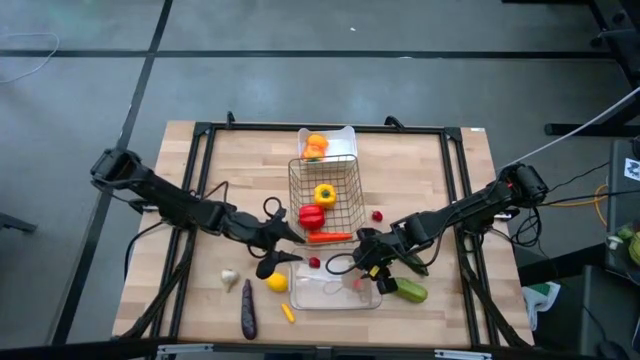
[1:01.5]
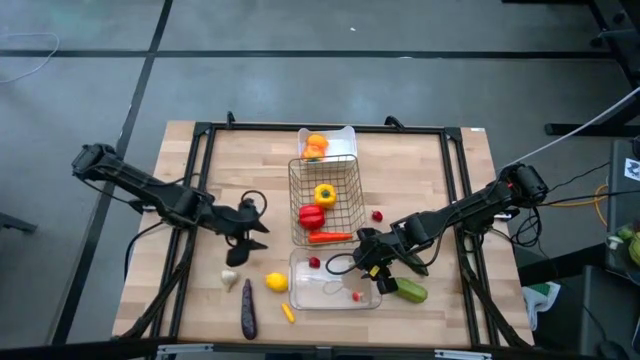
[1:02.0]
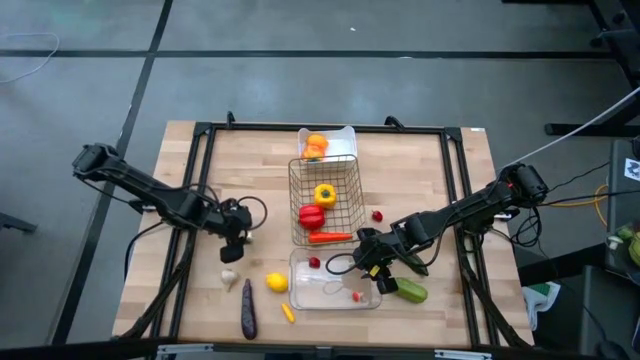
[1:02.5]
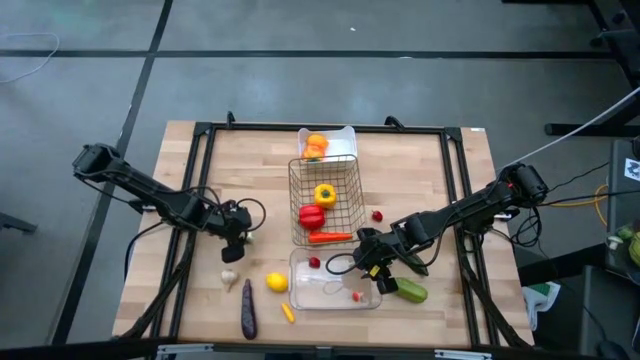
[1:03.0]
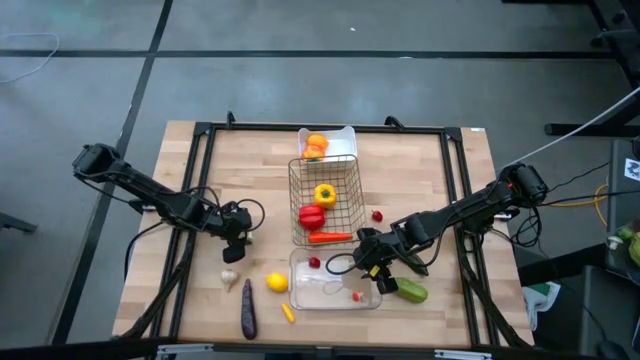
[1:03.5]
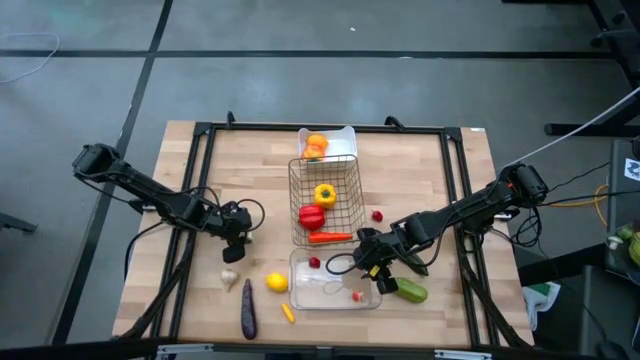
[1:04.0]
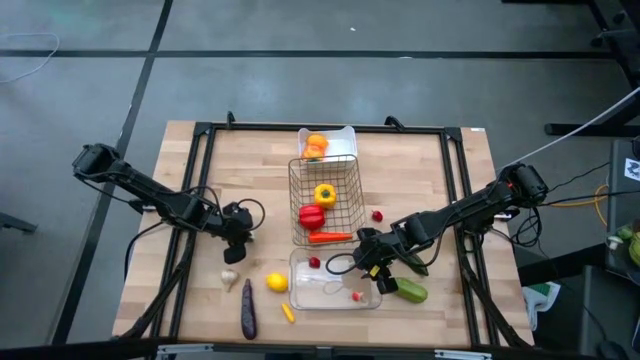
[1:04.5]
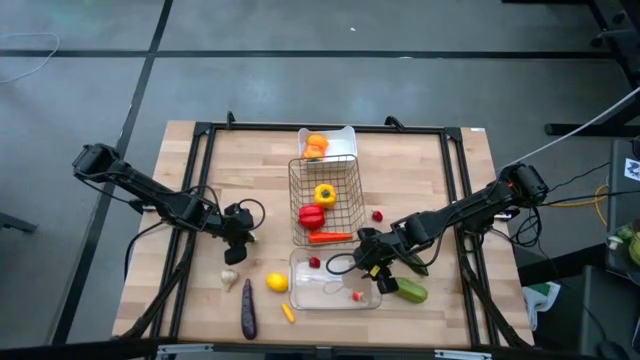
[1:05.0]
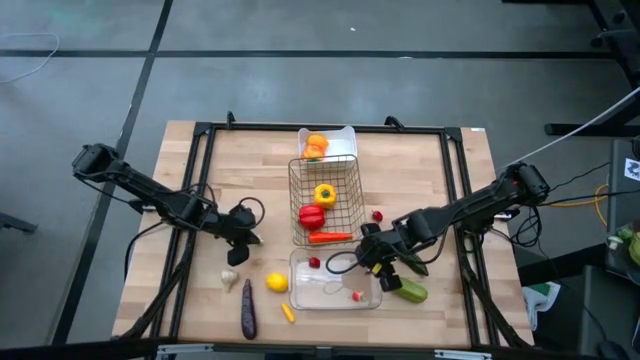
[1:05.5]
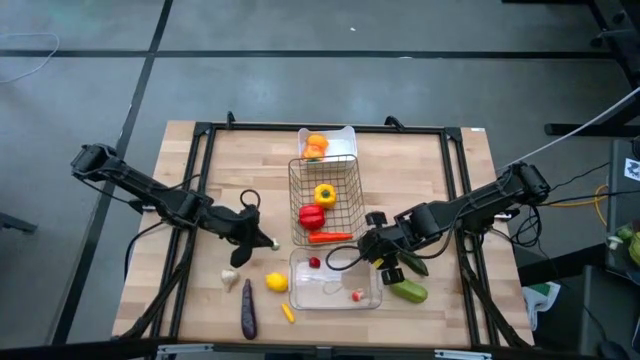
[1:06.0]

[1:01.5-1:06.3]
Task: Sort produce into baskets
Put the left green mushroom into the transparent bin

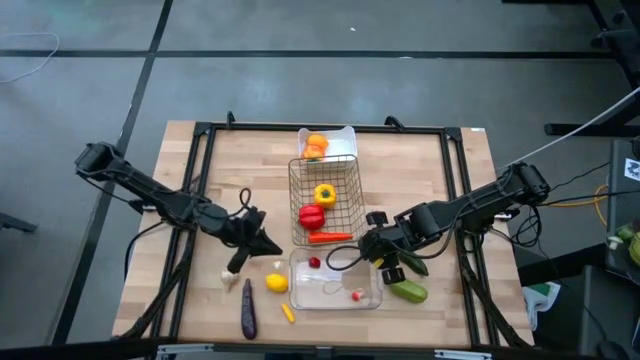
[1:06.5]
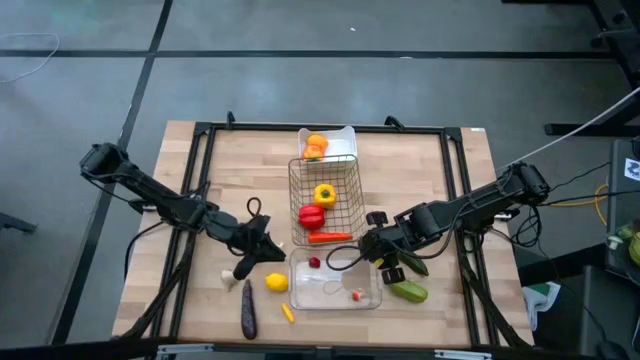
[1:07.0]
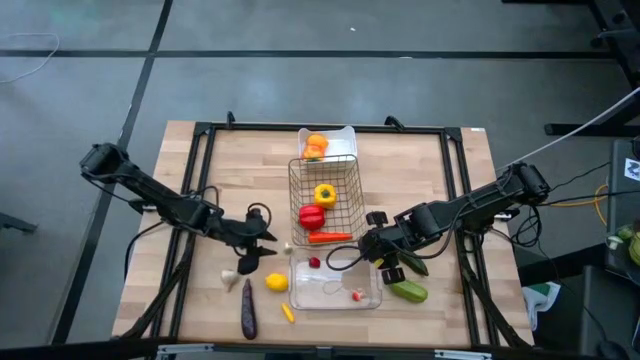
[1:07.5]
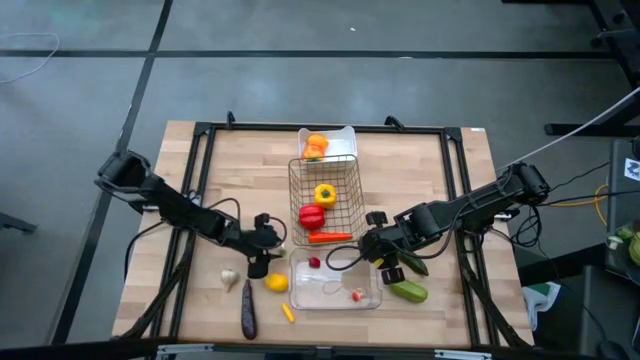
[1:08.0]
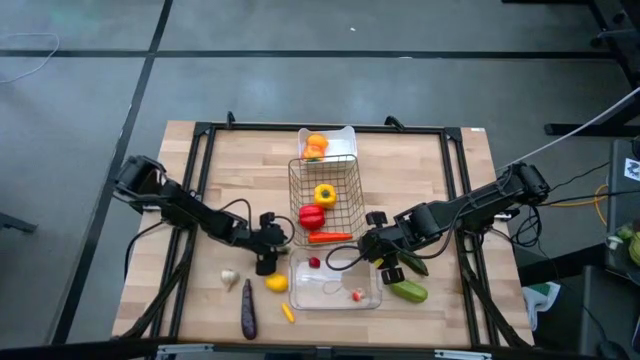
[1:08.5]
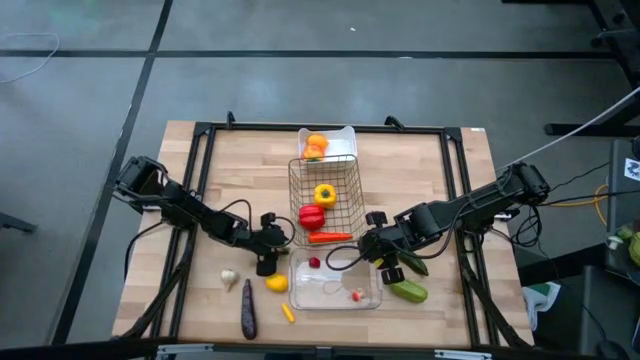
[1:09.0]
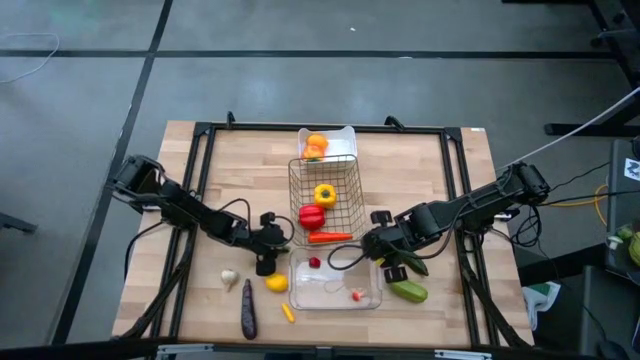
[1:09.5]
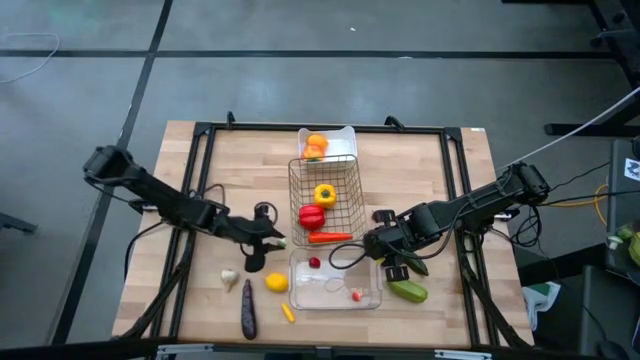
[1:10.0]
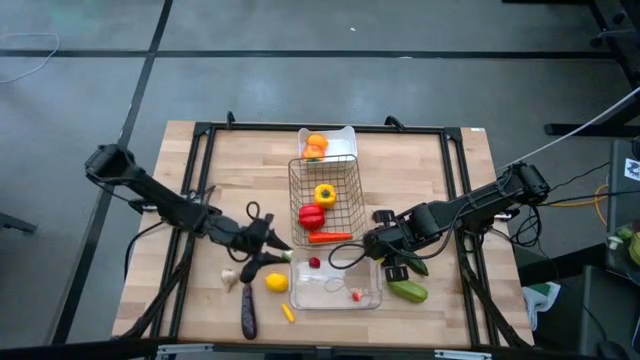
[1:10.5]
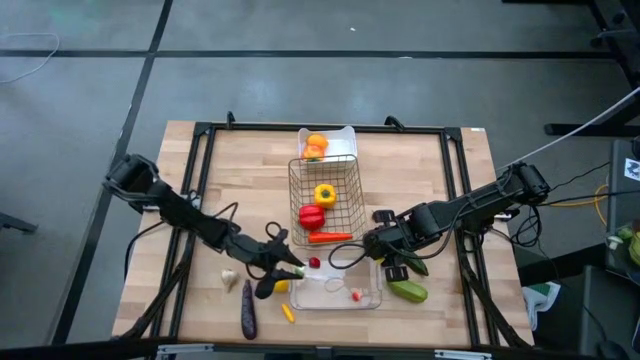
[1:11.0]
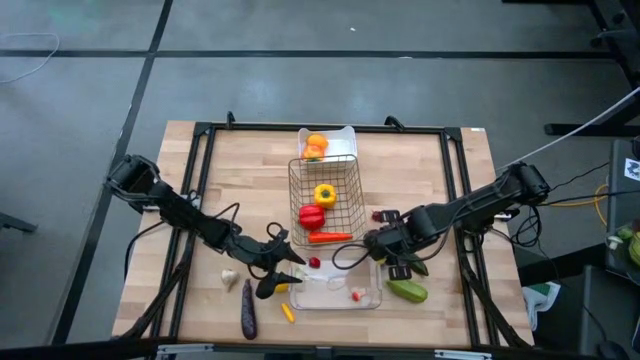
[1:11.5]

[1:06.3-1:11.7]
Put the left green mushroom into the transparent bin

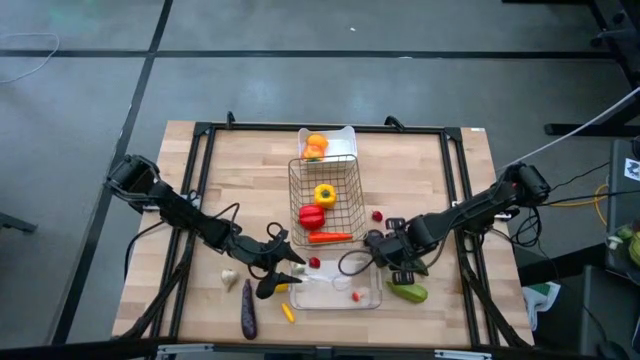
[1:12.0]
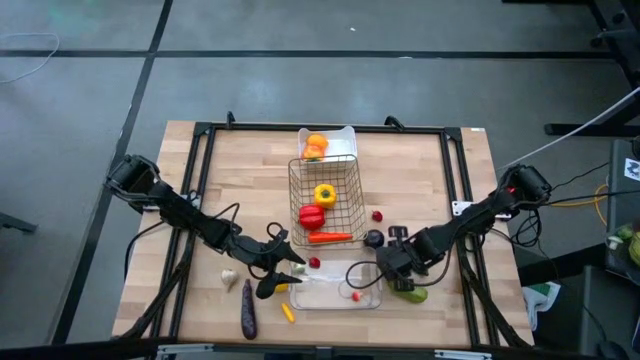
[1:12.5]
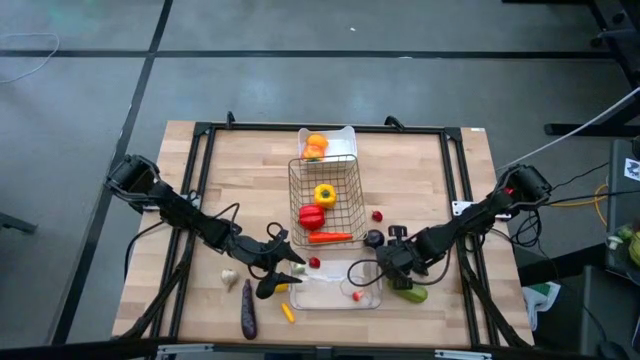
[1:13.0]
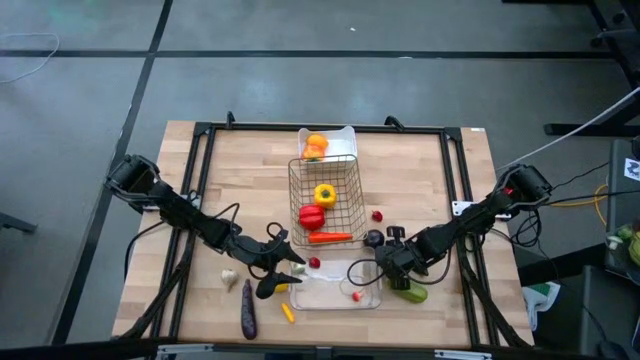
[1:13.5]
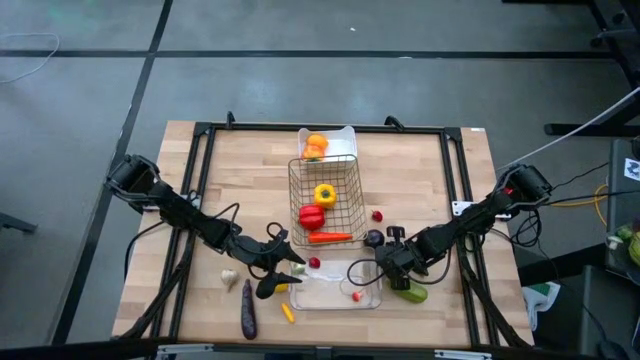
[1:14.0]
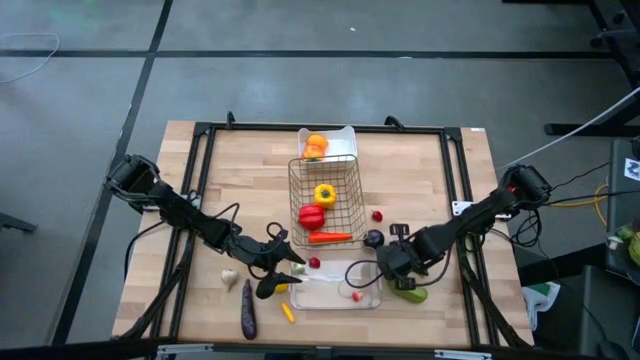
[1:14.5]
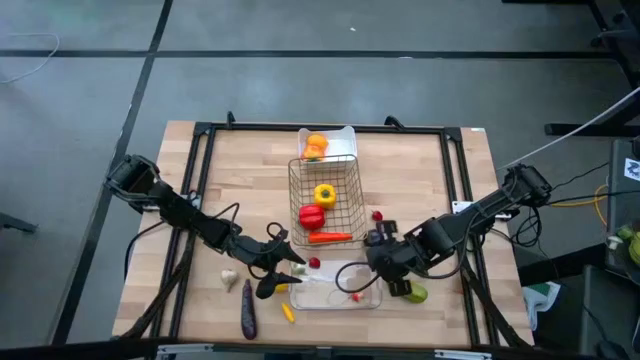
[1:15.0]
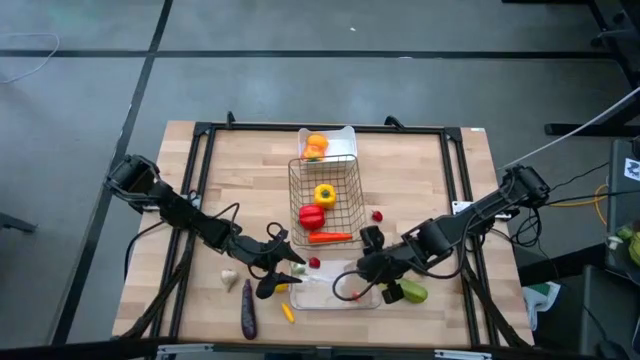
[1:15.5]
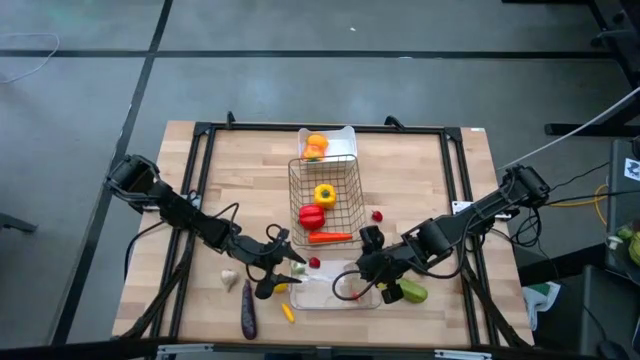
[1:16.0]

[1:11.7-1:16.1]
Put the green mushroom into the transparent bin

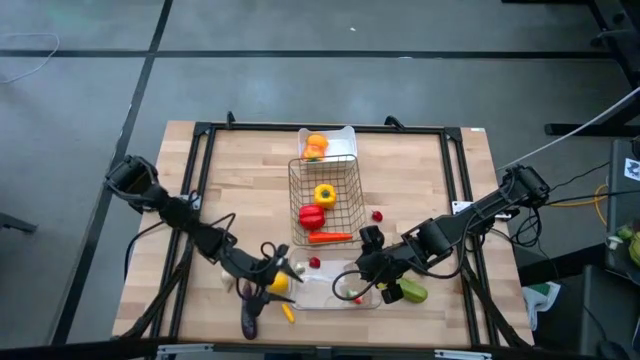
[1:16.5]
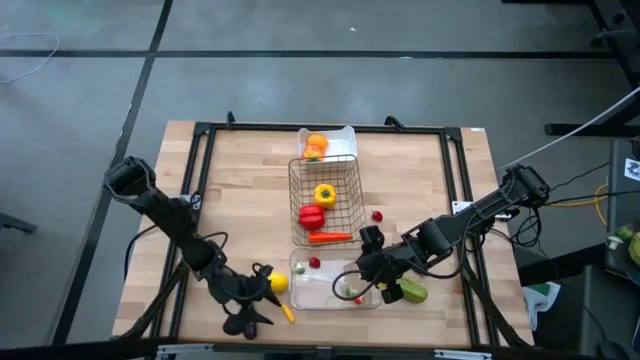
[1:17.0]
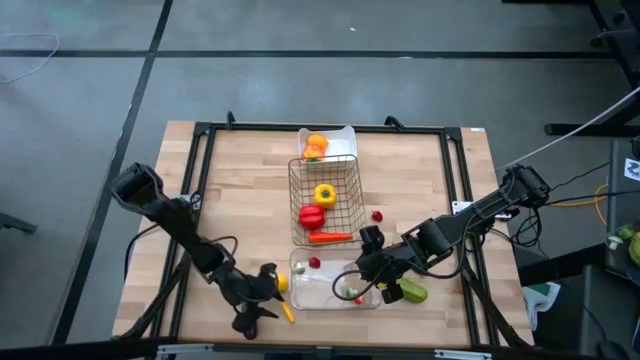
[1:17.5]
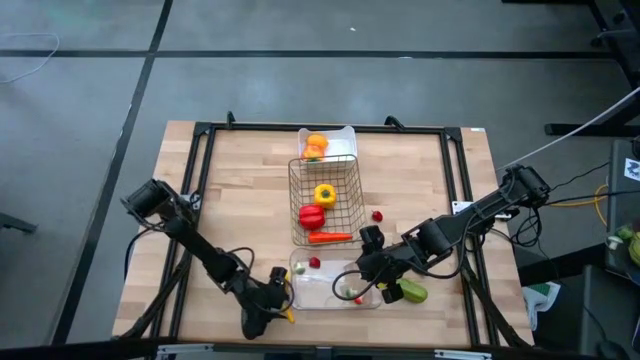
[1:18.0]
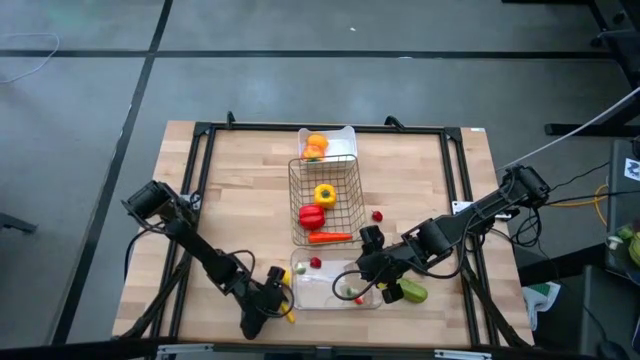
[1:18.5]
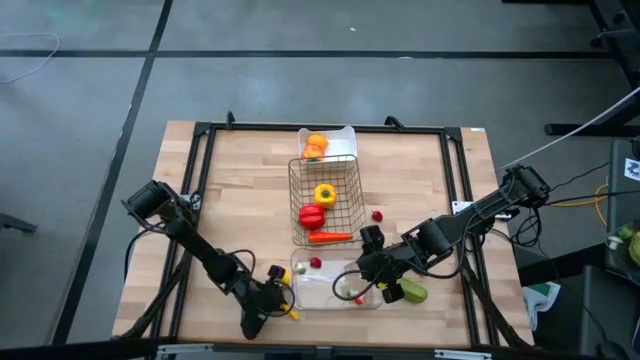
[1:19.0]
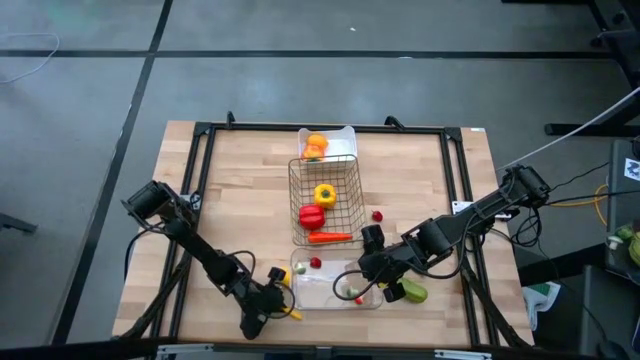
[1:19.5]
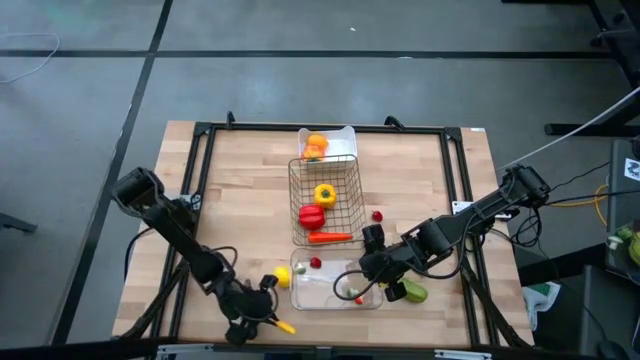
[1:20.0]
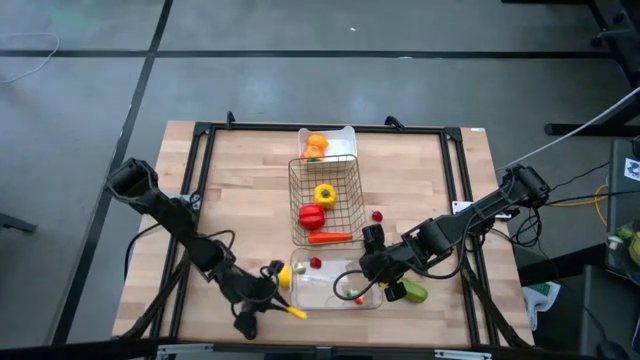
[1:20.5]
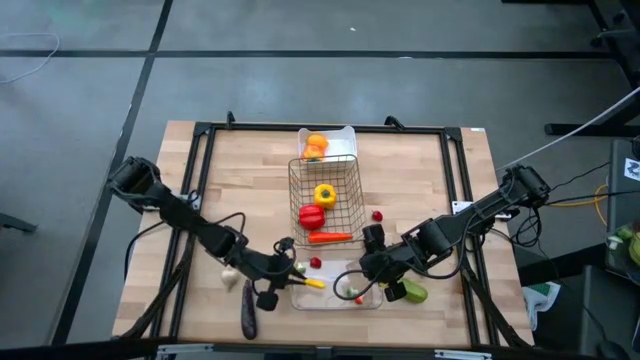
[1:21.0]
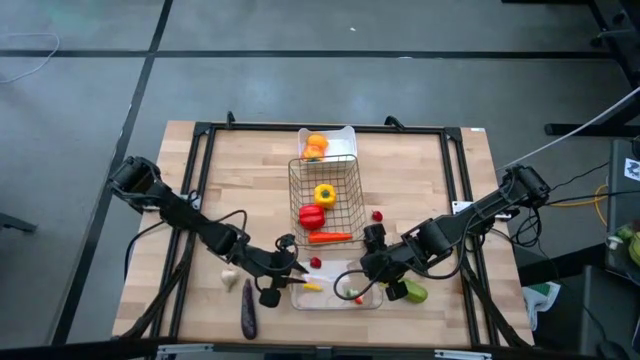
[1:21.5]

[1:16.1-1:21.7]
Put the yellow corn into the transparent bin
